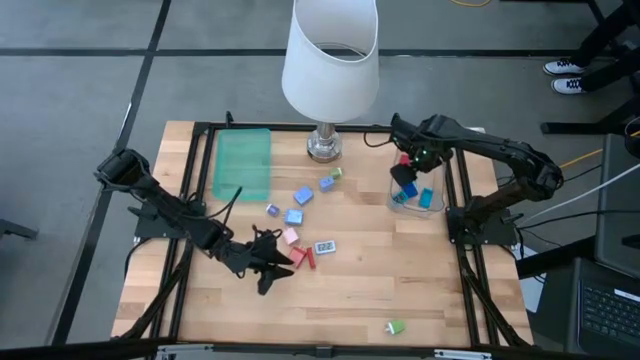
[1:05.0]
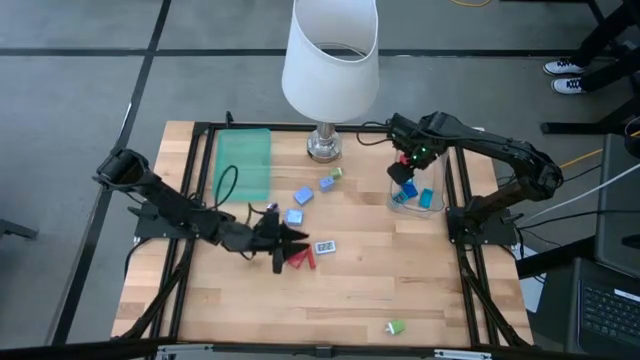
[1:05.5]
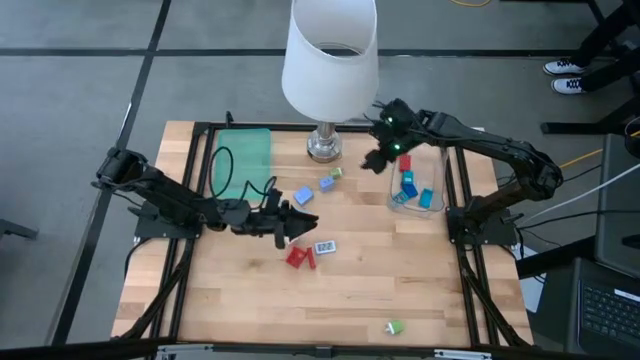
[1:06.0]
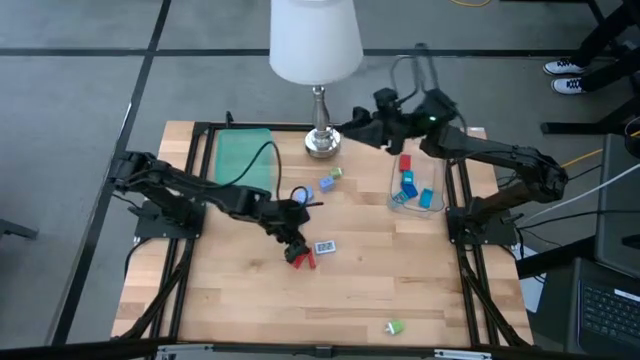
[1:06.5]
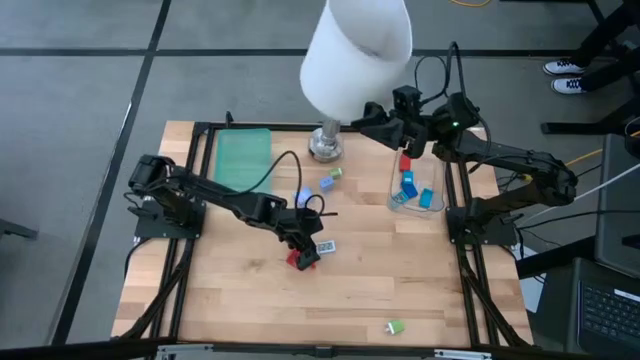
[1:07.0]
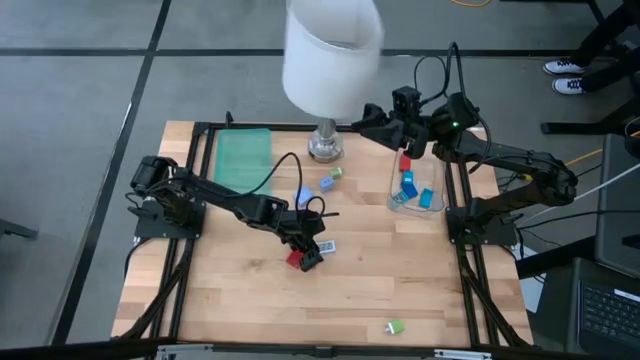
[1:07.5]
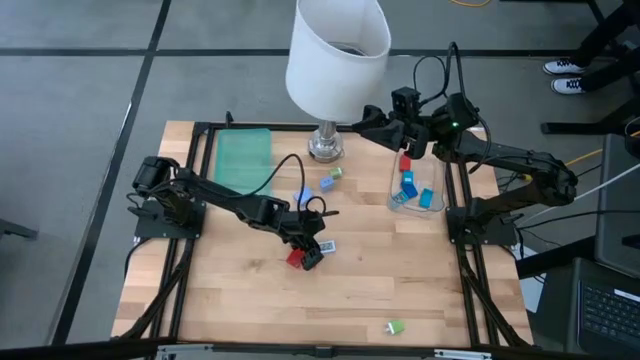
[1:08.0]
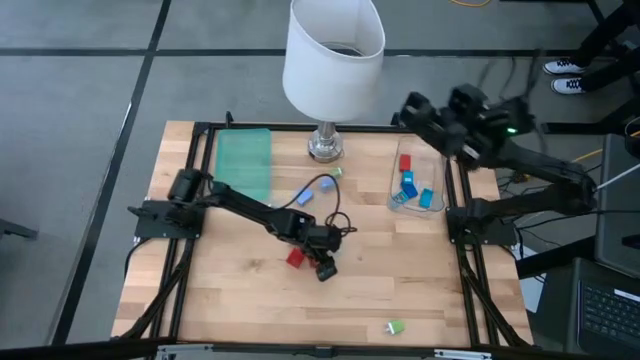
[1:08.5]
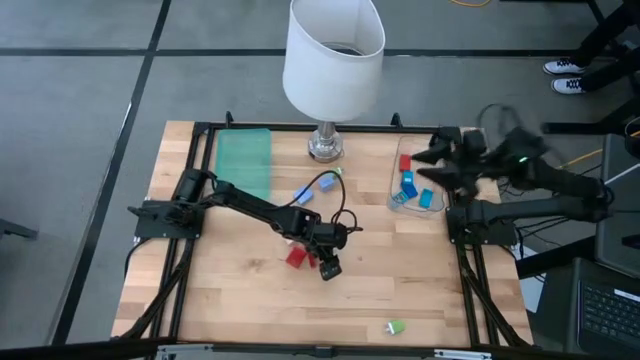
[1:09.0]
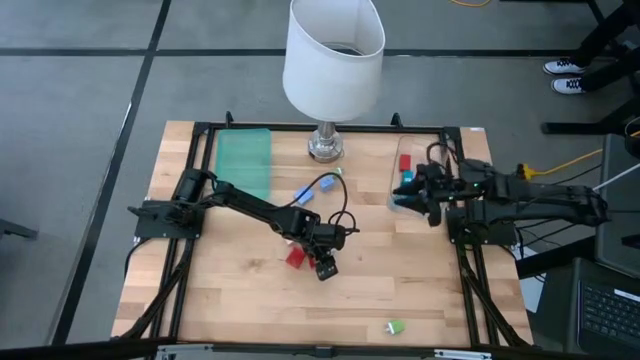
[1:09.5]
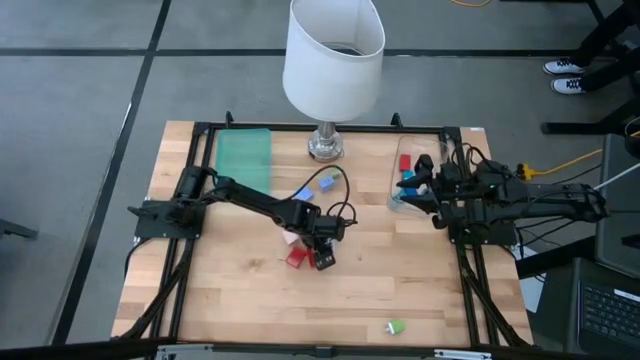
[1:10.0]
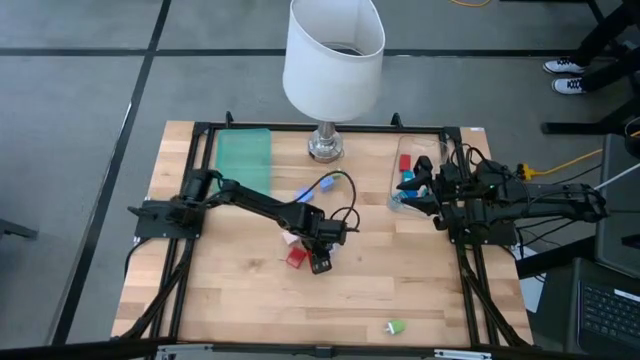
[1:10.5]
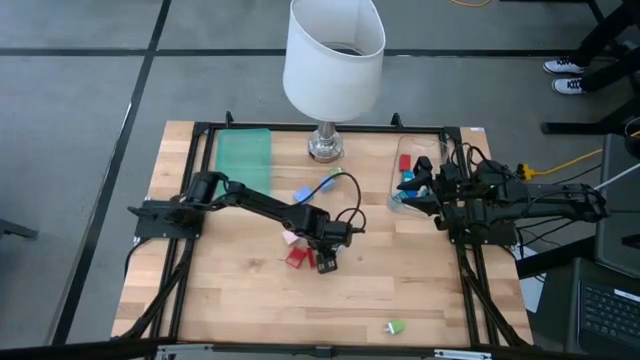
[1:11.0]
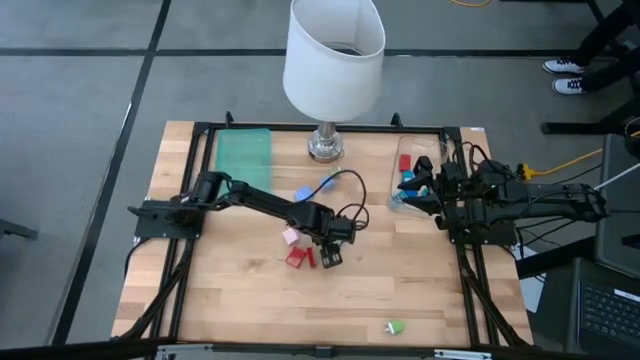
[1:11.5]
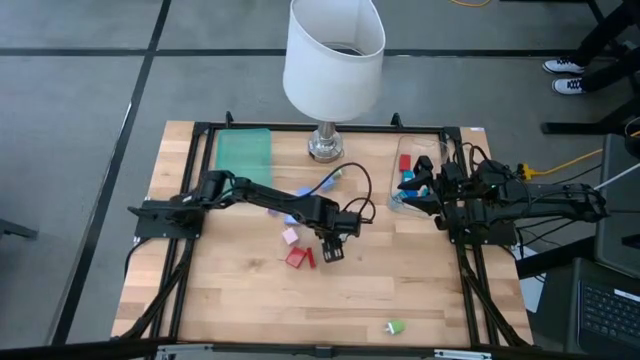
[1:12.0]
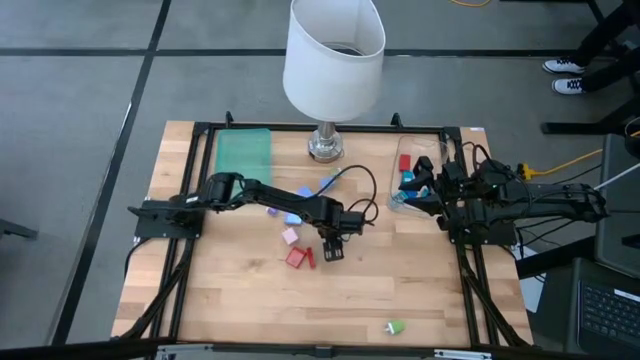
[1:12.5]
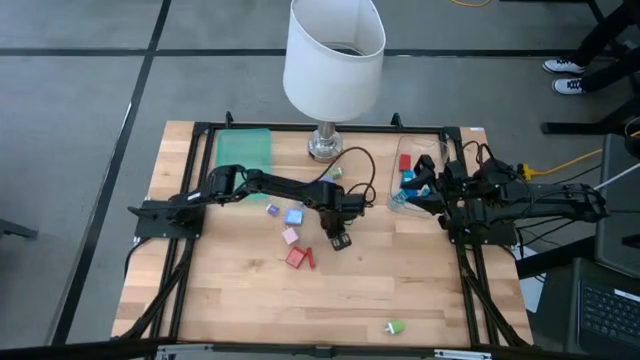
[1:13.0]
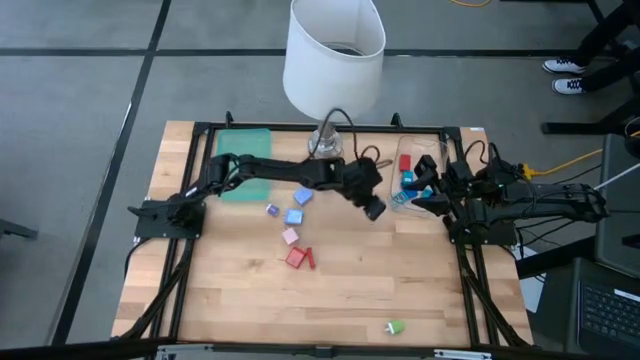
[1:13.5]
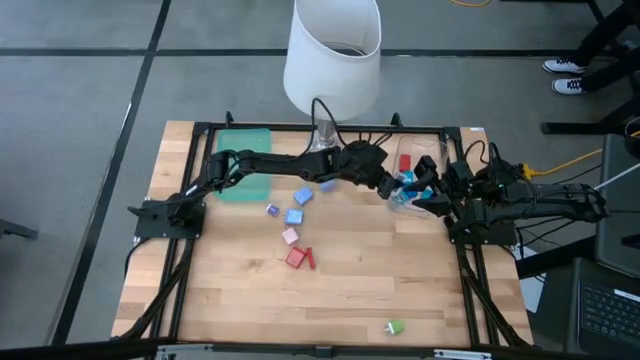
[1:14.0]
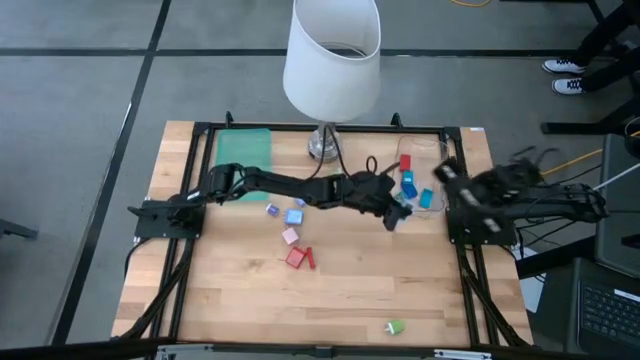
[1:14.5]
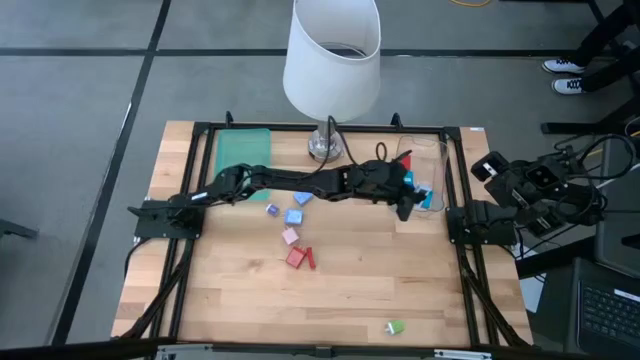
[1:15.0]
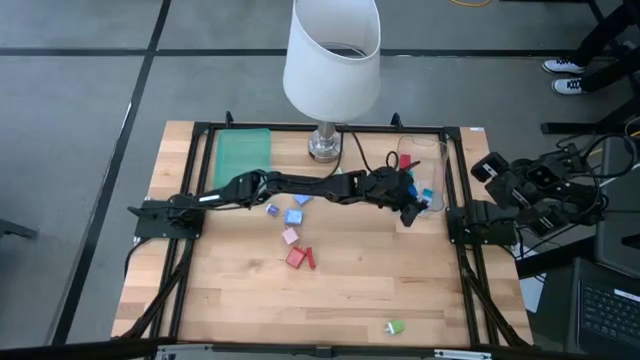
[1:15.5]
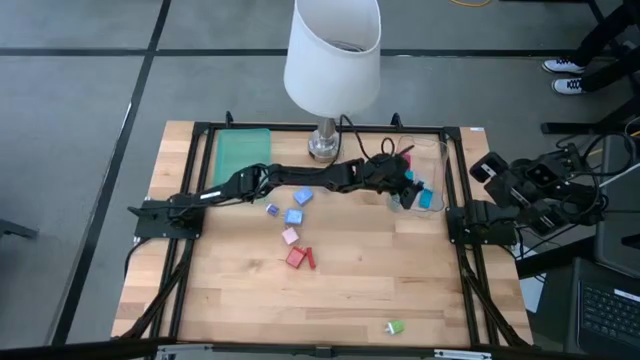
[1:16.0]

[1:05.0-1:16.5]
Task: Pick & Place Office items
Put the white digital timer into the transparent bin

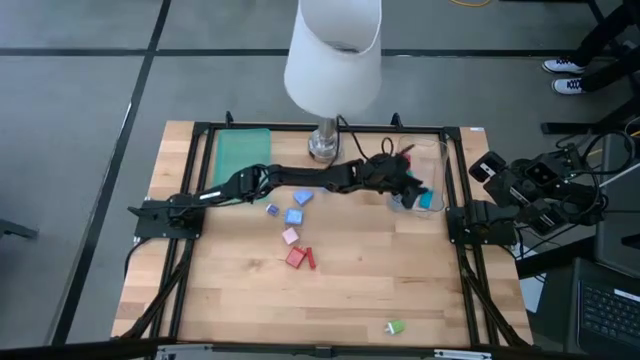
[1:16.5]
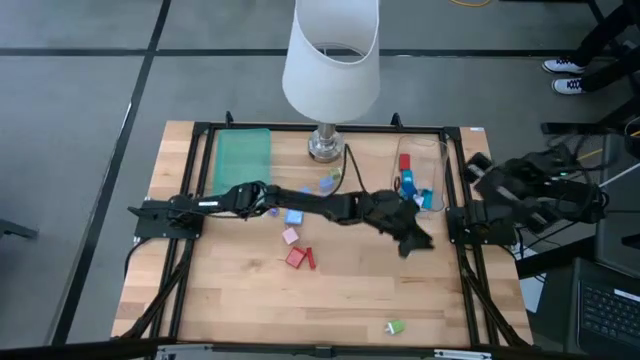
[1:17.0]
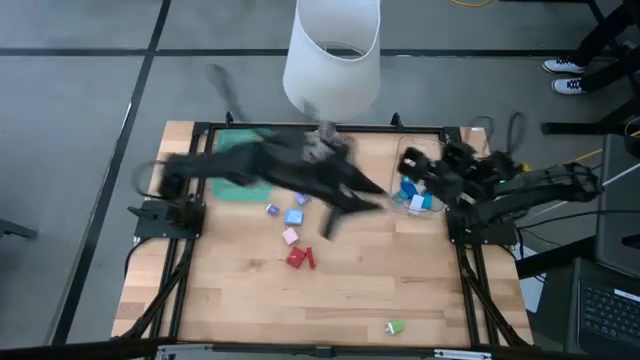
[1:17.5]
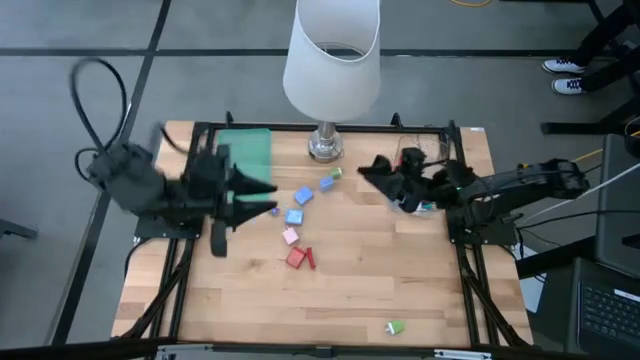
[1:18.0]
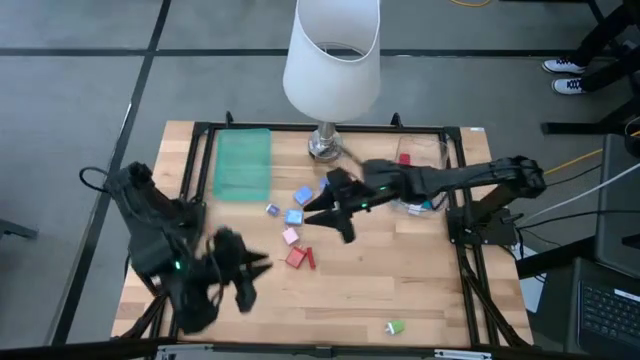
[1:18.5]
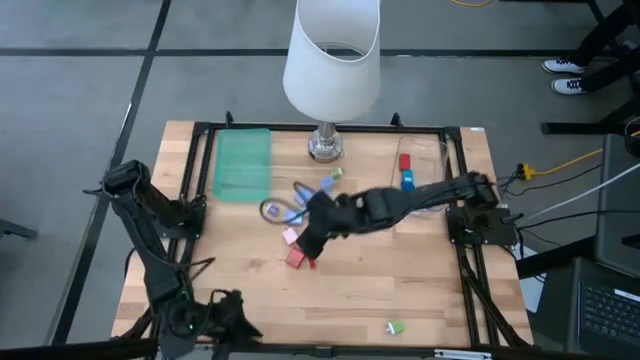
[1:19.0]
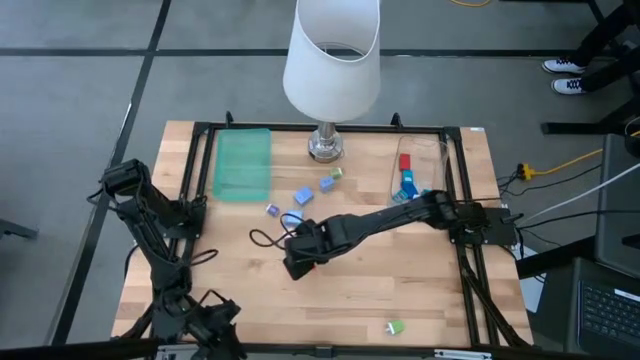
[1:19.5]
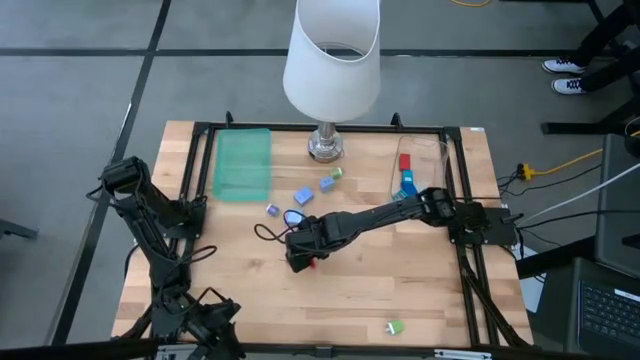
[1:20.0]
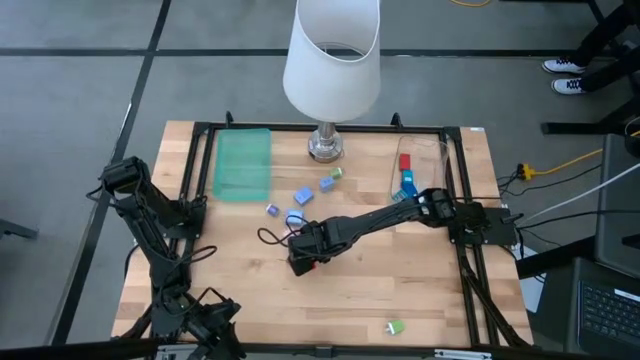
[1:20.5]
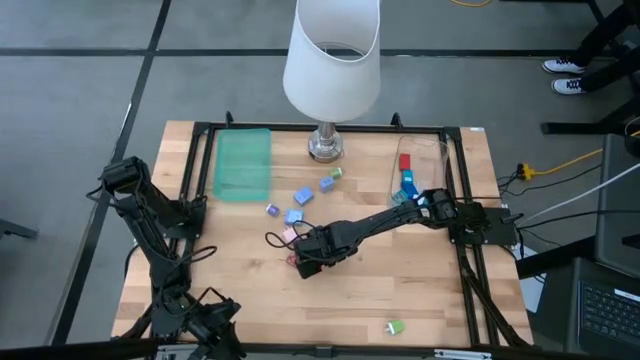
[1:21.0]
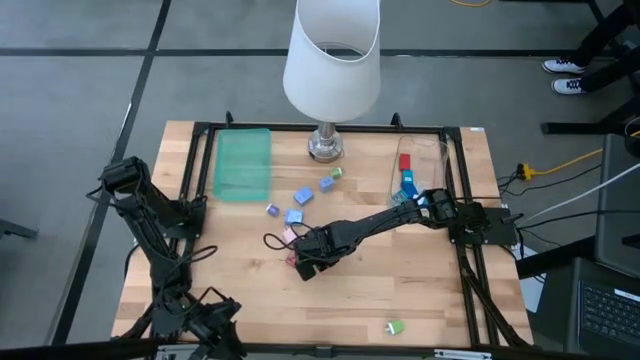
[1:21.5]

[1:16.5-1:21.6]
Put the red digital timer into the transparent bin

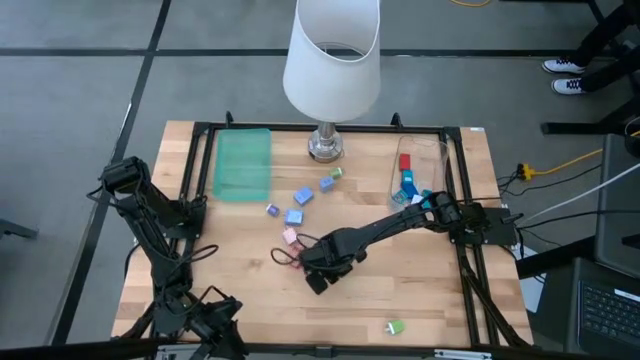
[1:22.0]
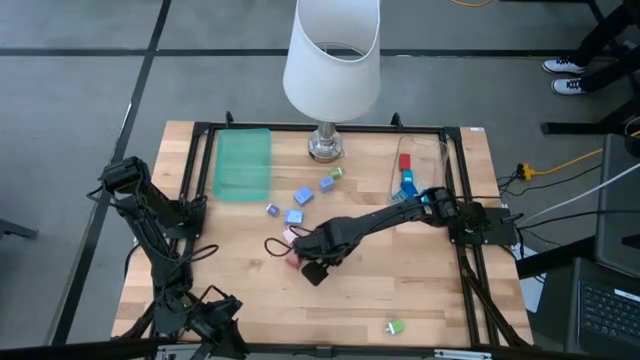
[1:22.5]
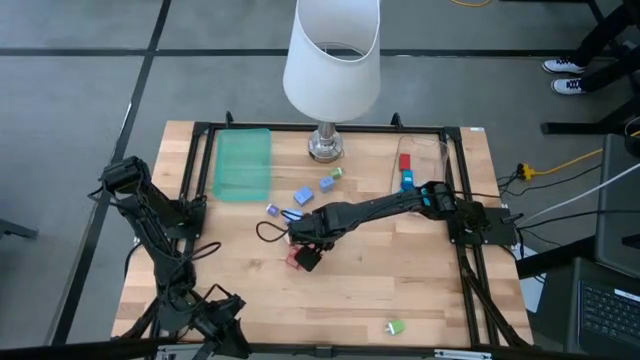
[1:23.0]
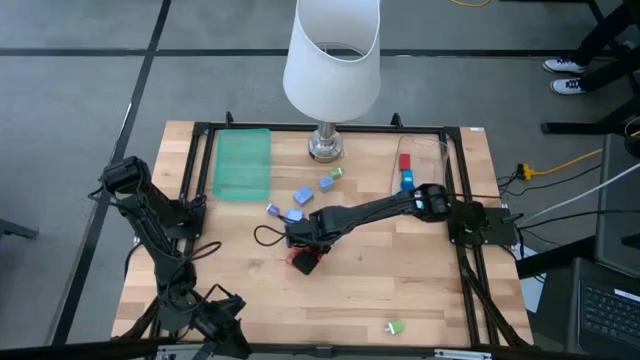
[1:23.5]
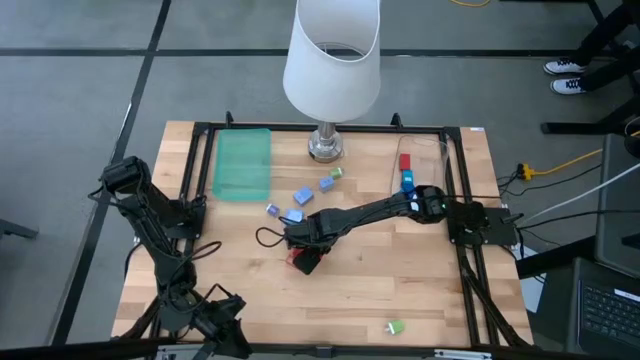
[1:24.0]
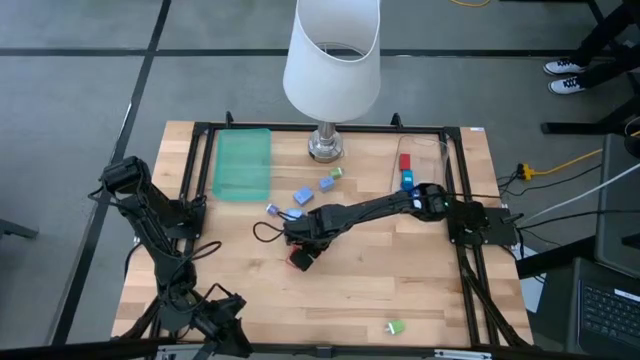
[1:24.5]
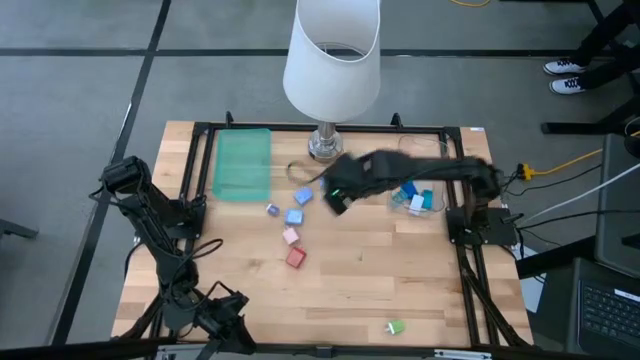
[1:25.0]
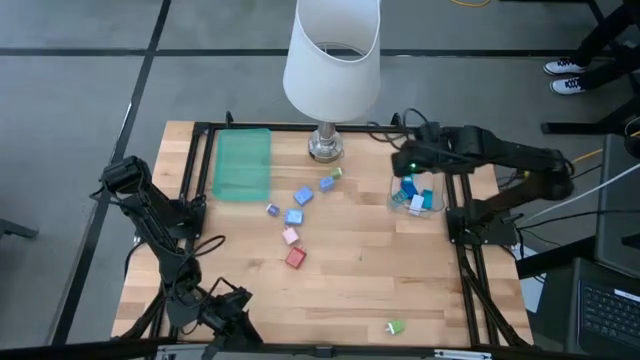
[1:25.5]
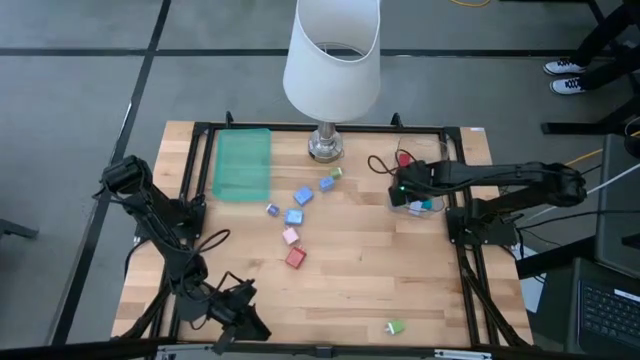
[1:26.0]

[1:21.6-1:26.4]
Put the red digital timer into the transparent bin

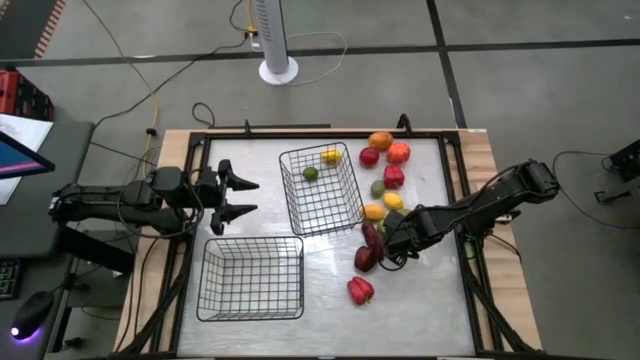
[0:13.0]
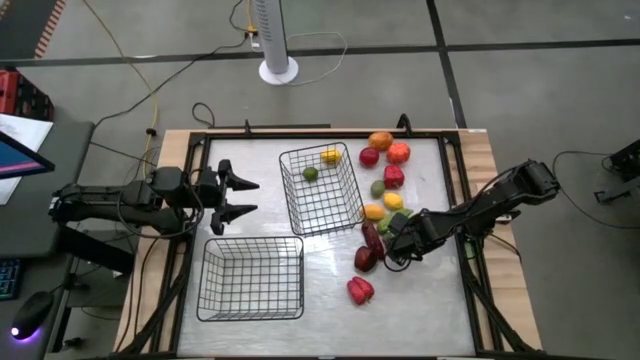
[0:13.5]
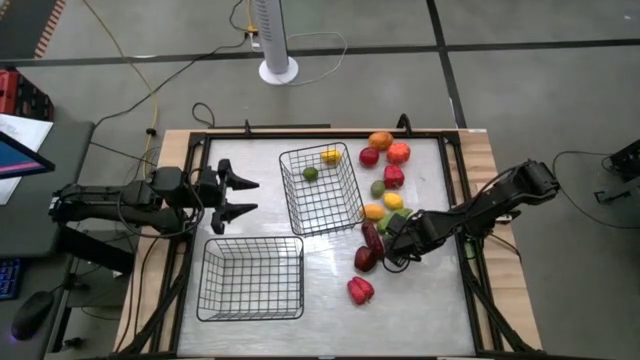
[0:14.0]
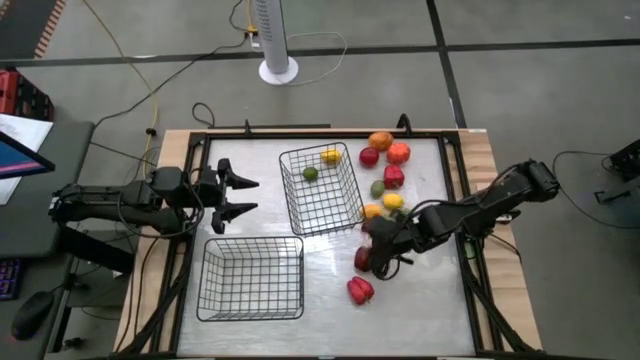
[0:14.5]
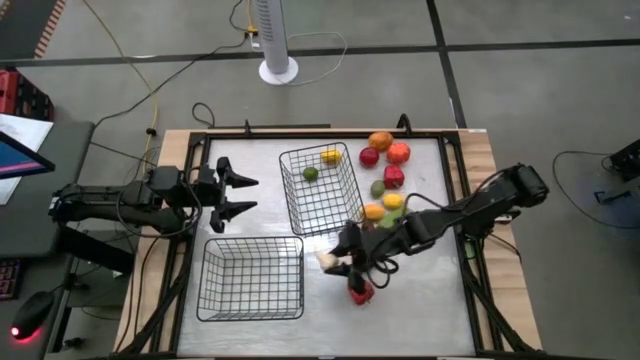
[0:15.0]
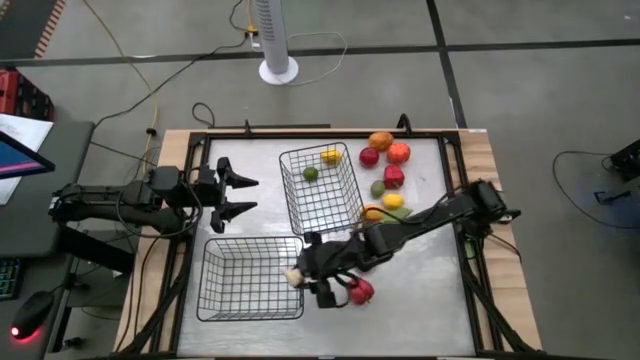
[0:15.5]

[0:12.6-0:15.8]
Task: Sort produce into baskets
Put the white garlic into the bottom black wire basket
